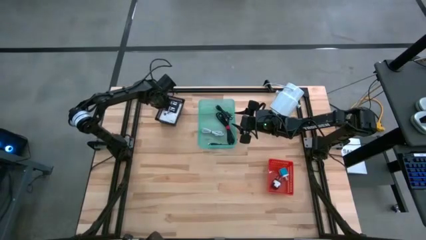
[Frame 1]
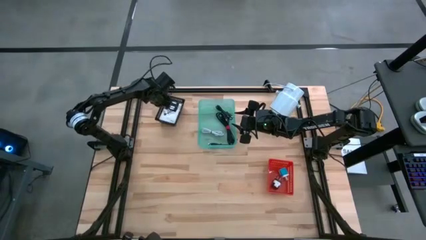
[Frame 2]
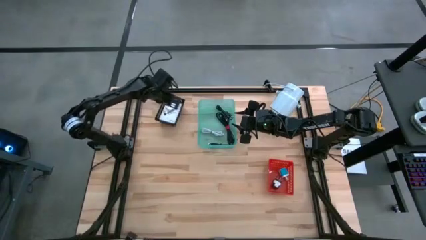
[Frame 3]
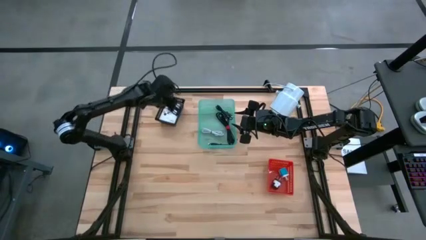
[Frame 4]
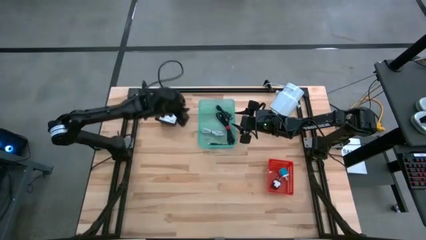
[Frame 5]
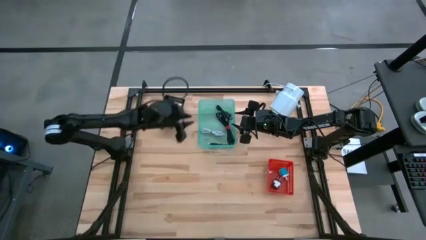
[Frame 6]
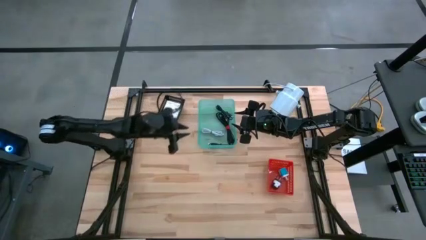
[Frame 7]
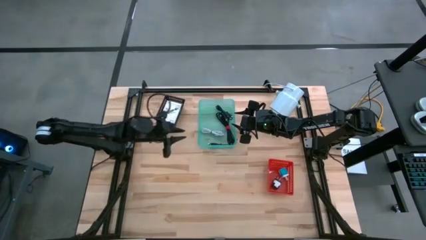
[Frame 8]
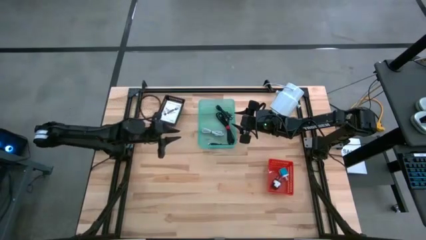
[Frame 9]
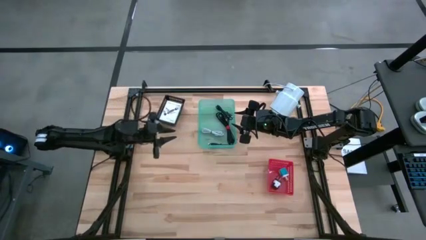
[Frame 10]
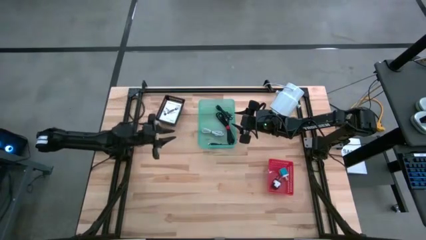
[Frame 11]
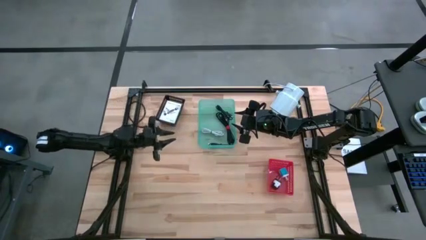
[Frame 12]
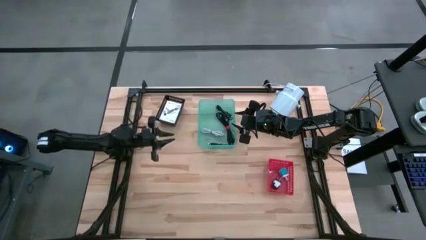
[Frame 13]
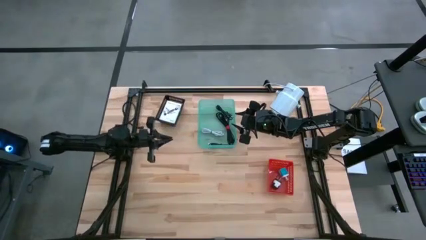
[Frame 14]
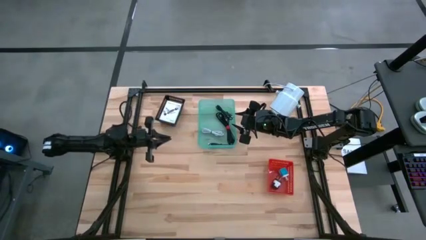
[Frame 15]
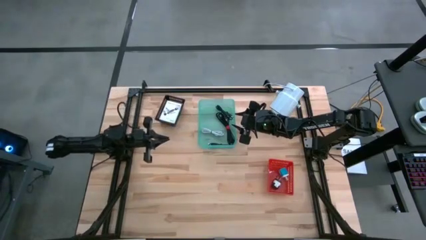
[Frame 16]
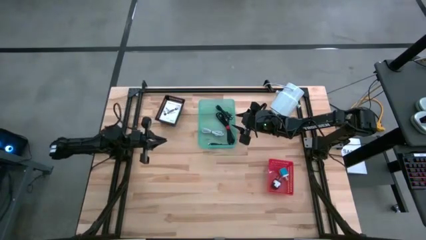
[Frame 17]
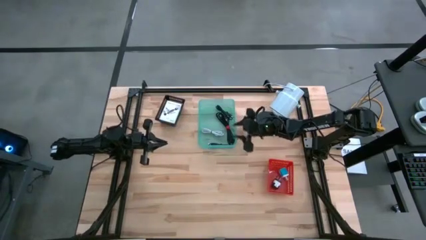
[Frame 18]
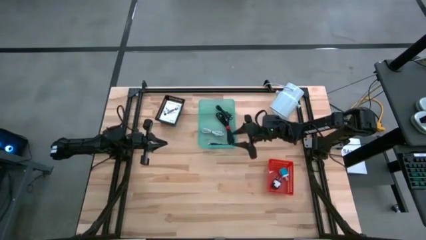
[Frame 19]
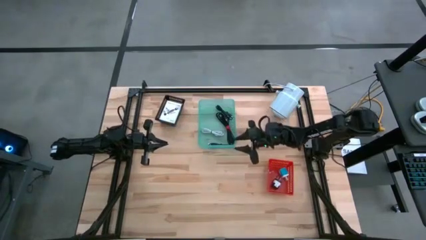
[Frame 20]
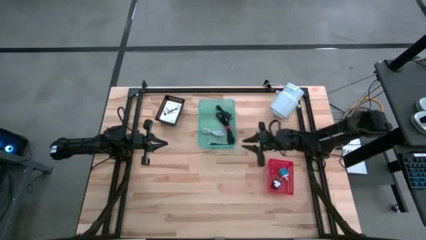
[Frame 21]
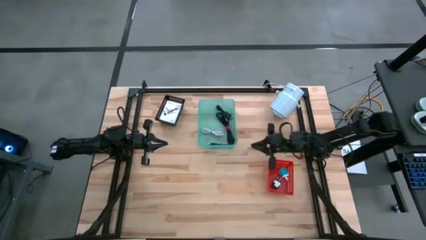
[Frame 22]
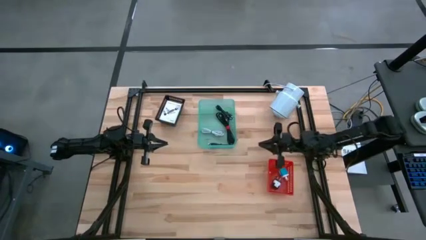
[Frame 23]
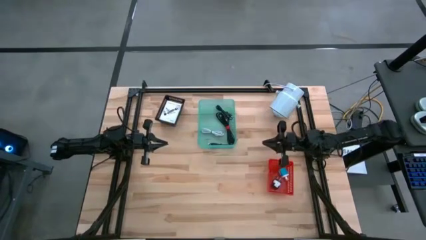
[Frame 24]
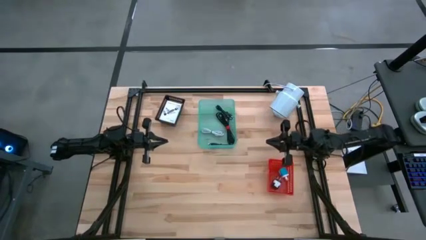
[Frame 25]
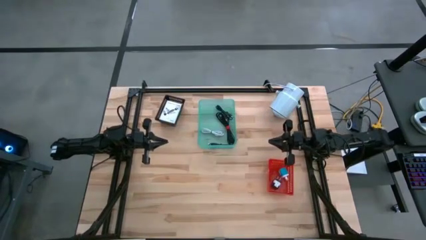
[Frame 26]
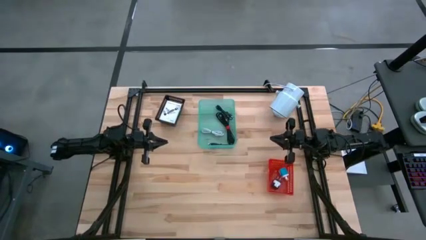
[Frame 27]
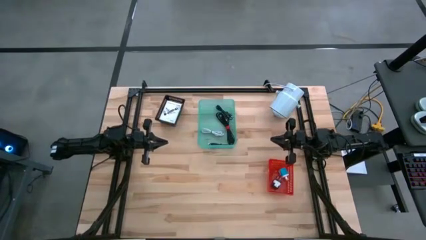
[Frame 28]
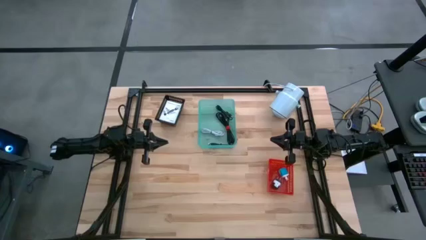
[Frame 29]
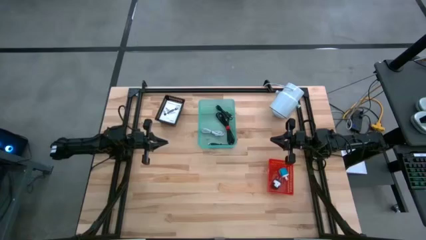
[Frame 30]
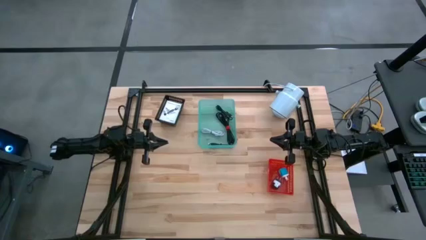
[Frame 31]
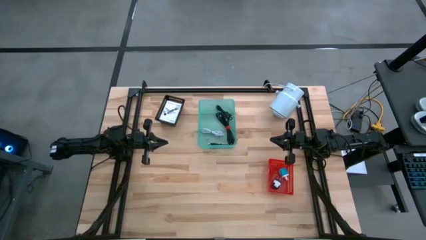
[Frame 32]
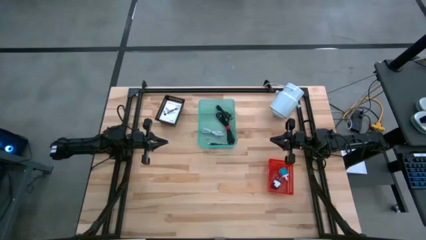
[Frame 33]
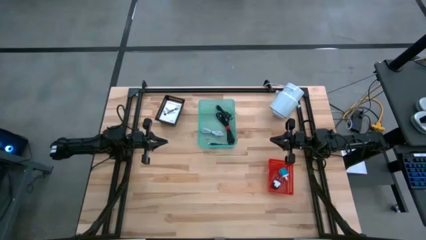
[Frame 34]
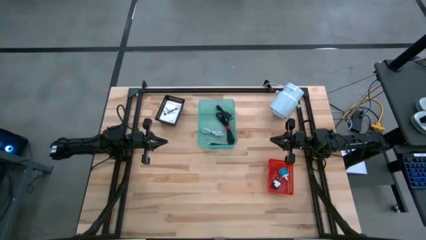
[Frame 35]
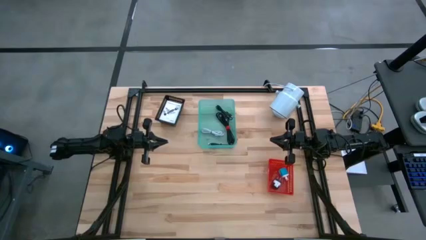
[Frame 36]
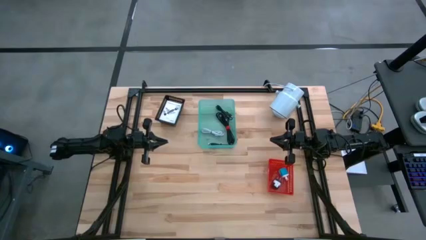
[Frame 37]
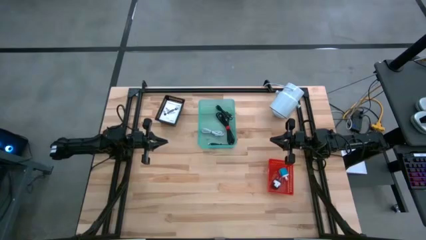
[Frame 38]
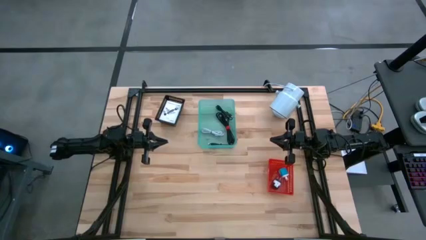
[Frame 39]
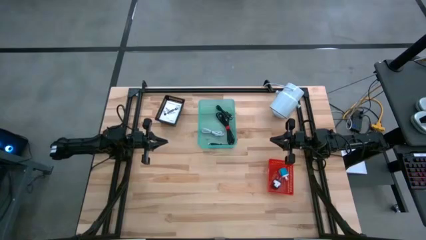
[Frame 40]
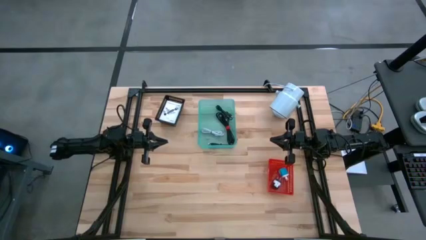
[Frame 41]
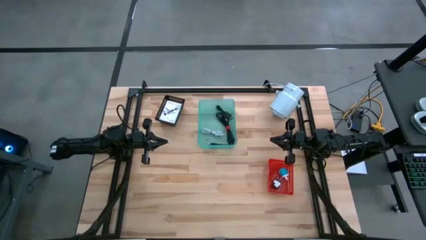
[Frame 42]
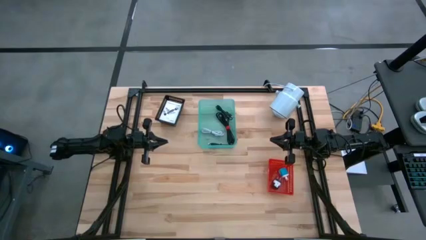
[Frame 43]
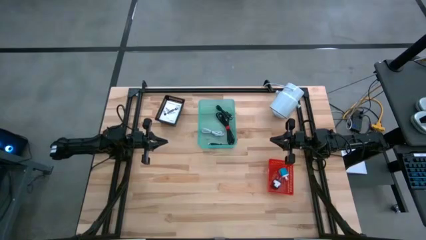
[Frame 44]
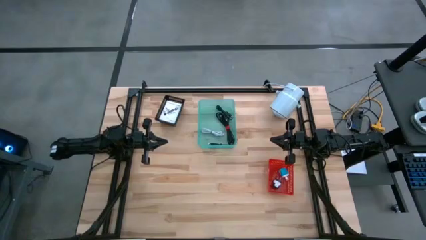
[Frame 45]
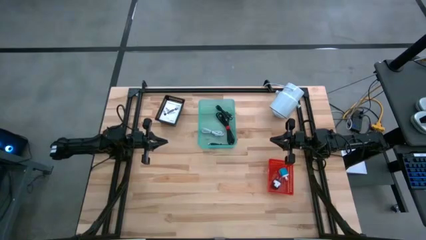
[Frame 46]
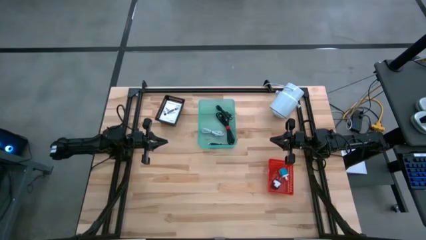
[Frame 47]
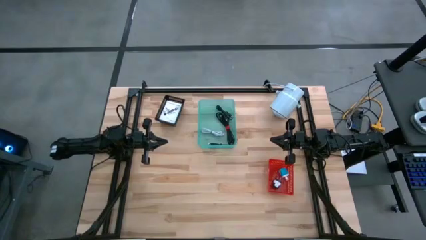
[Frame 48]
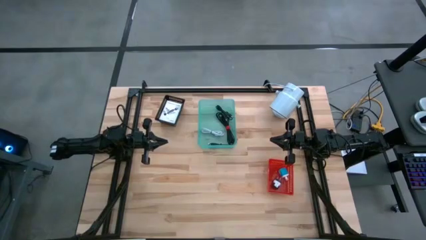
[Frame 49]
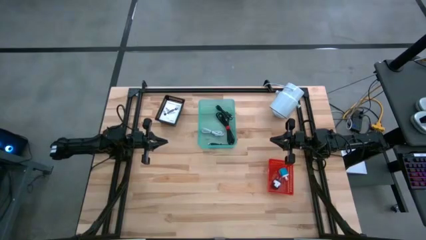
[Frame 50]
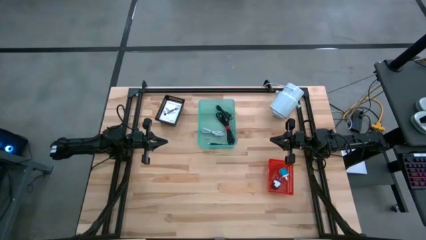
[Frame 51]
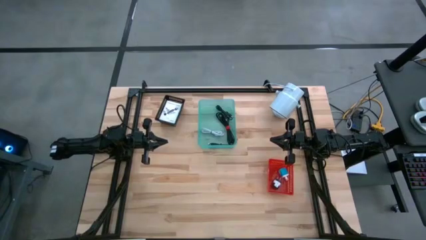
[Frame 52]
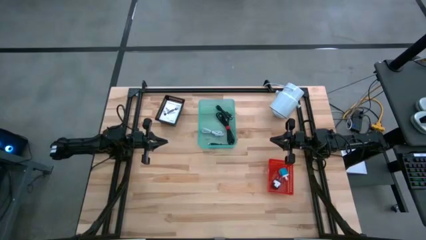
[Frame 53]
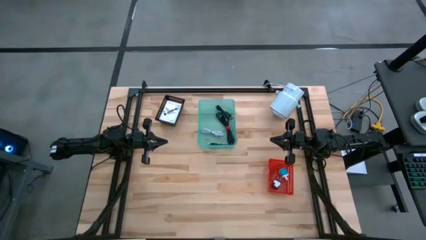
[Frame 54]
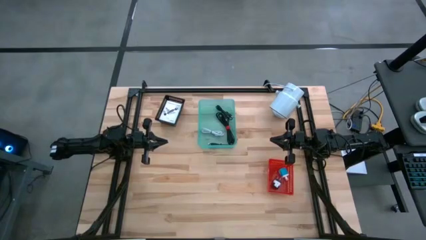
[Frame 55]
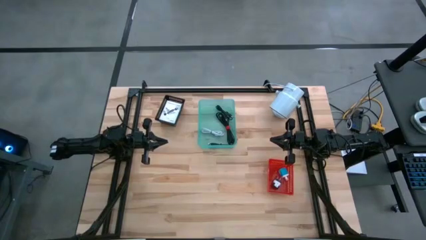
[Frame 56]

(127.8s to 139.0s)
Task: Pick and place items into bin
Return to Home Position

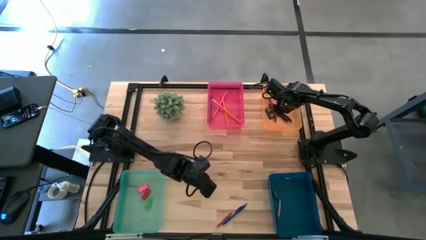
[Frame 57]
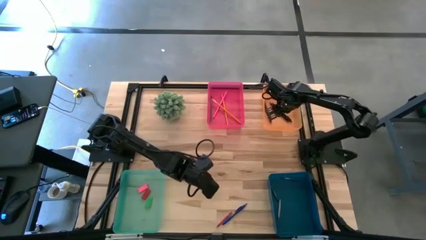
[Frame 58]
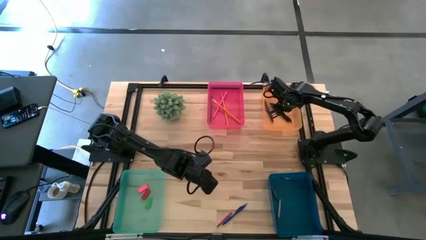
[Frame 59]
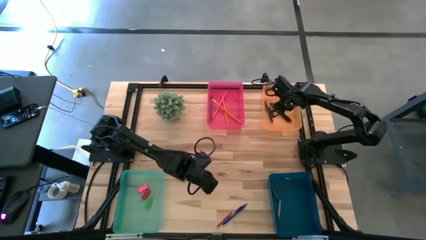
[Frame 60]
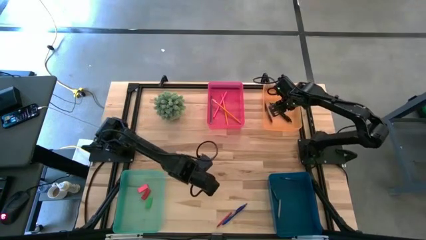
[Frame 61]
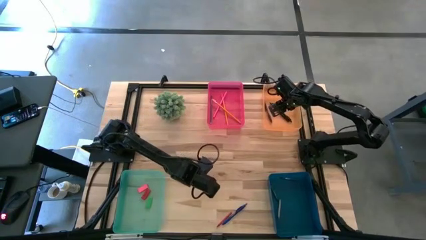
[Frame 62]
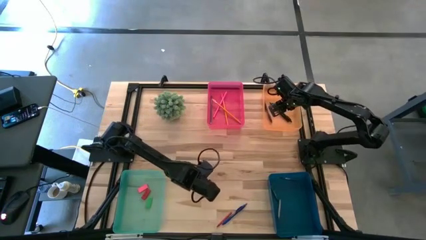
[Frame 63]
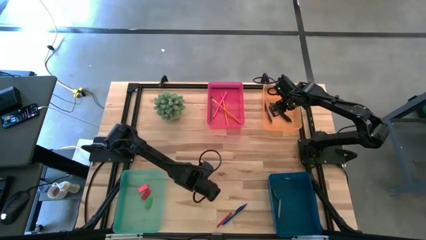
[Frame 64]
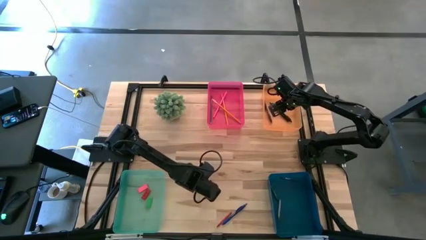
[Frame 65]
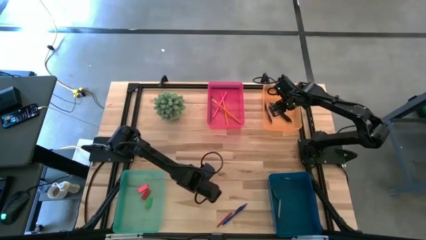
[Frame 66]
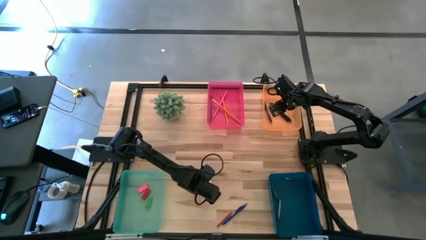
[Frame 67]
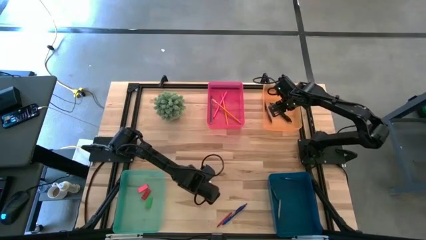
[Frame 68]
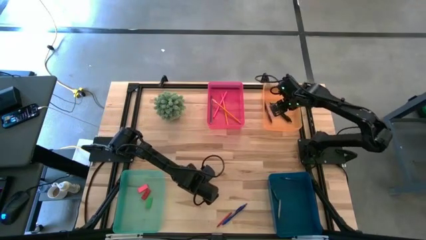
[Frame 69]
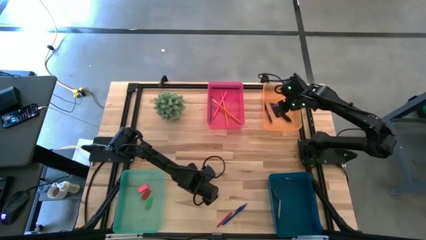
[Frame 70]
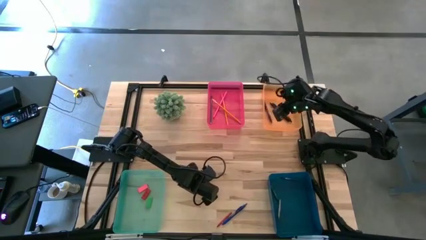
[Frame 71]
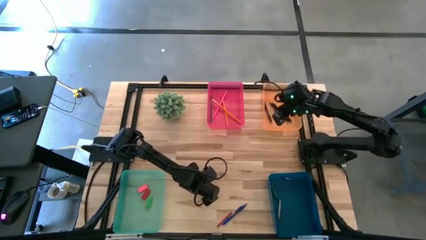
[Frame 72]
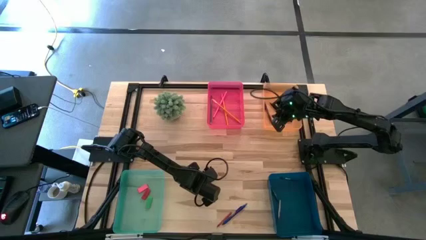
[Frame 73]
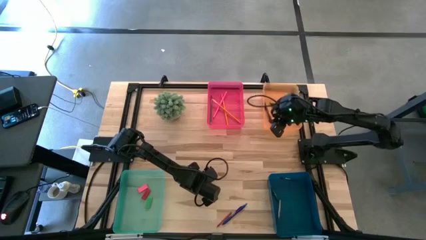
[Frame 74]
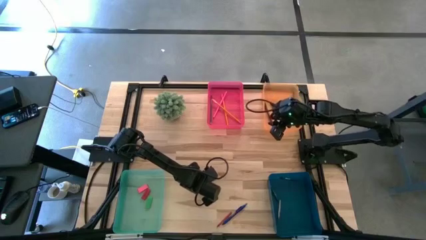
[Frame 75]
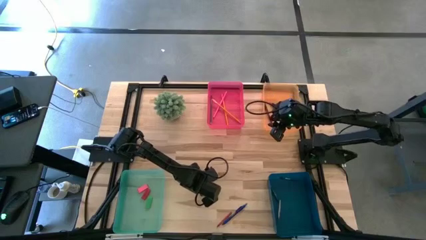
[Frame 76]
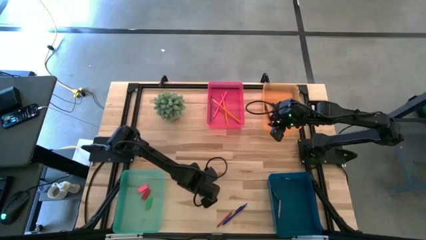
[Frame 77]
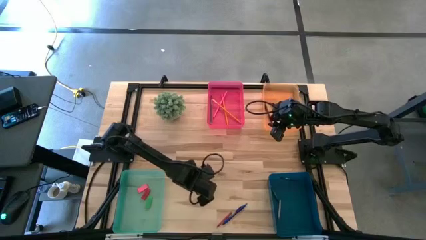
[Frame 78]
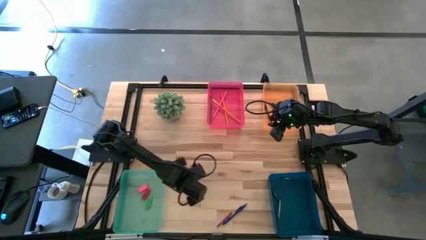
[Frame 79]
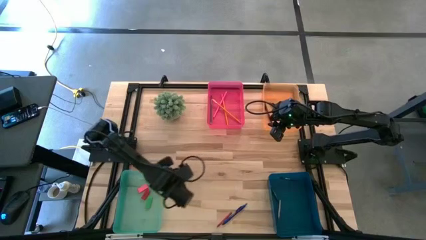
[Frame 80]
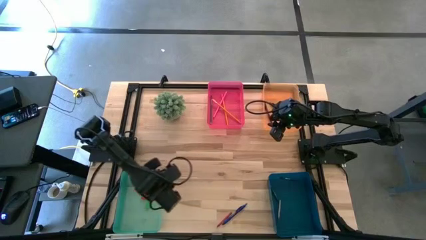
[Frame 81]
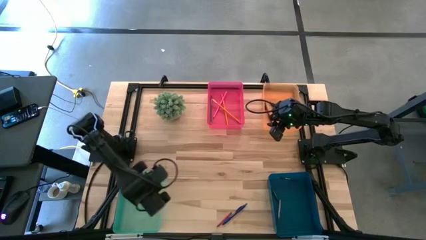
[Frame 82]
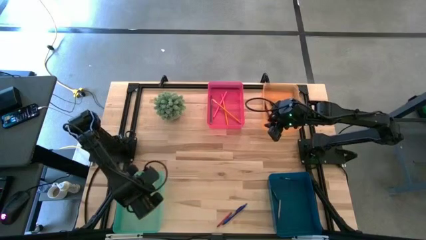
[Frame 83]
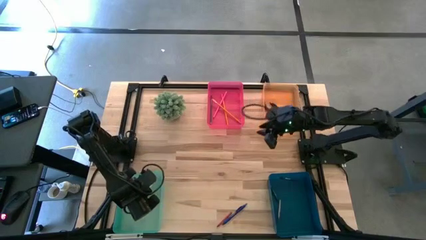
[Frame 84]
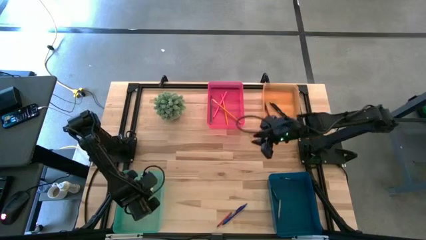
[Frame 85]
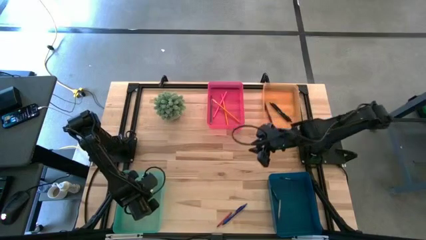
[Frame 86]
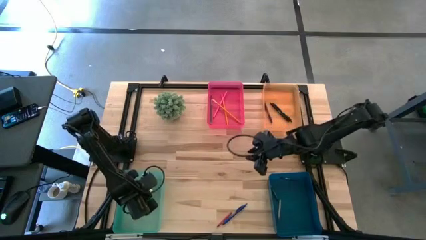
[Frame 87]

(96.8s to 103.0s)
Task: Sort crayons/erasers/pens/pencils in bins
Put the light green eraser into the green bin
